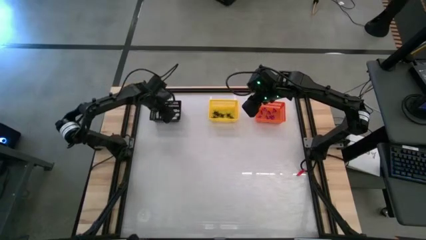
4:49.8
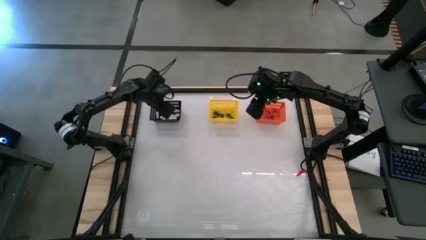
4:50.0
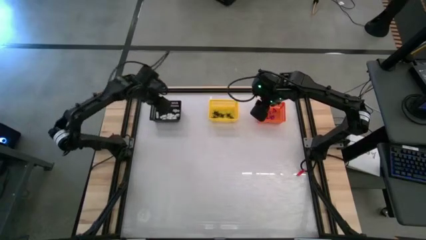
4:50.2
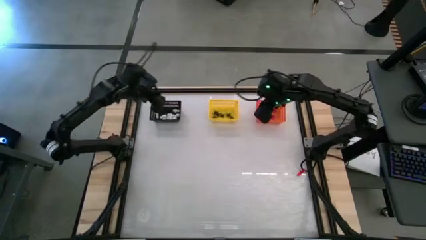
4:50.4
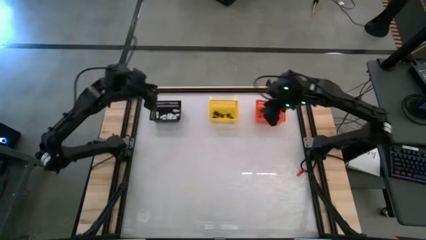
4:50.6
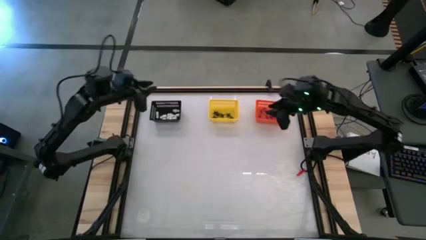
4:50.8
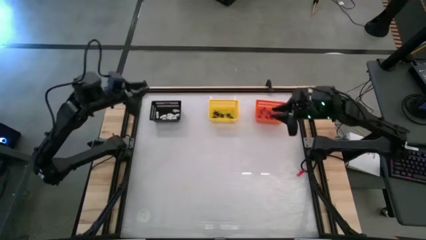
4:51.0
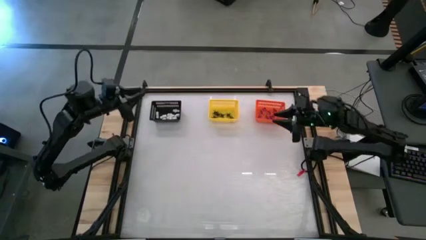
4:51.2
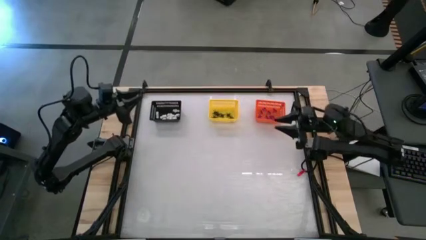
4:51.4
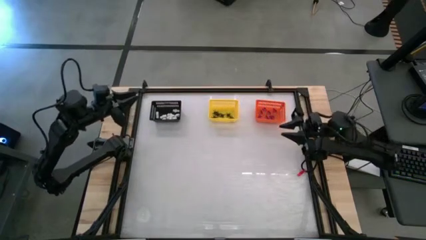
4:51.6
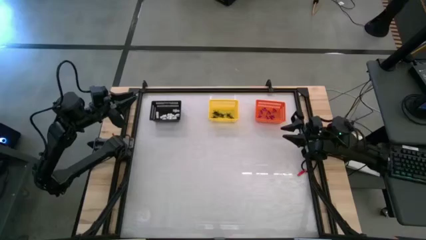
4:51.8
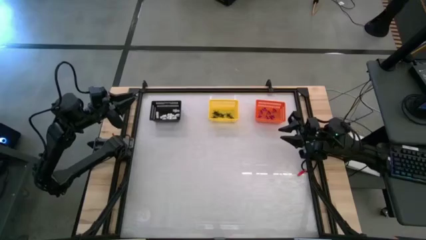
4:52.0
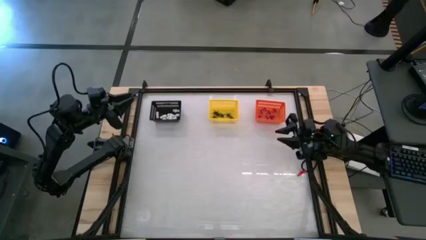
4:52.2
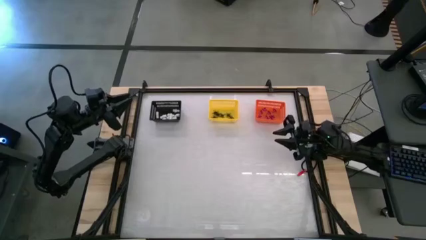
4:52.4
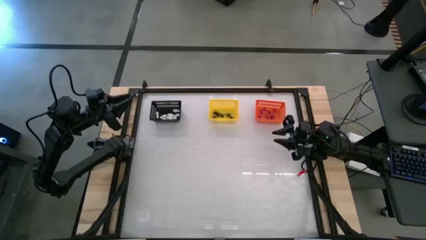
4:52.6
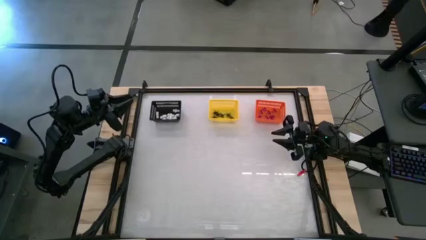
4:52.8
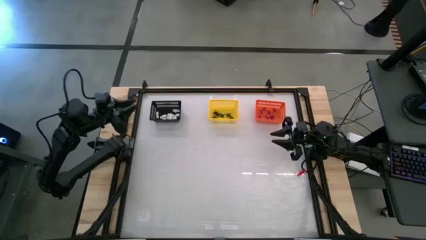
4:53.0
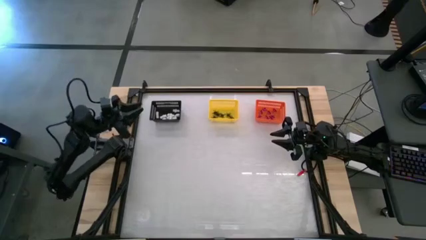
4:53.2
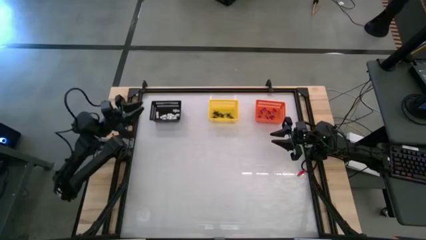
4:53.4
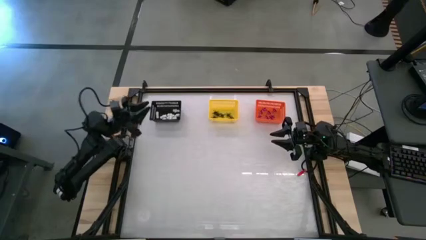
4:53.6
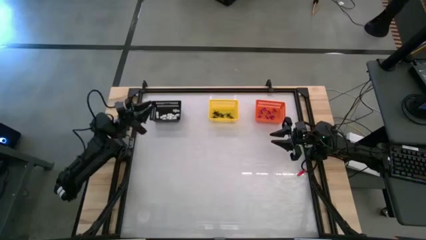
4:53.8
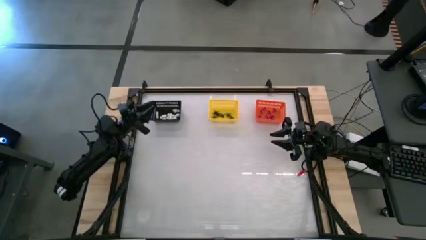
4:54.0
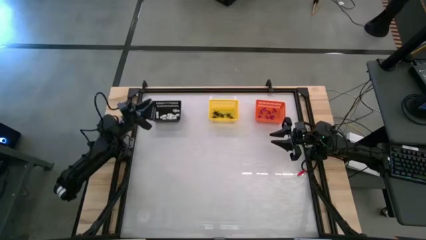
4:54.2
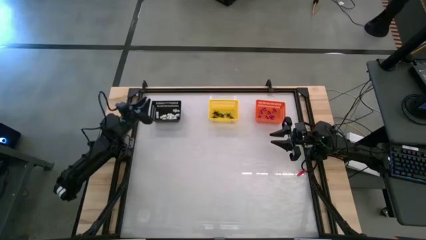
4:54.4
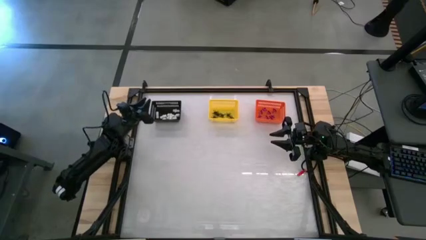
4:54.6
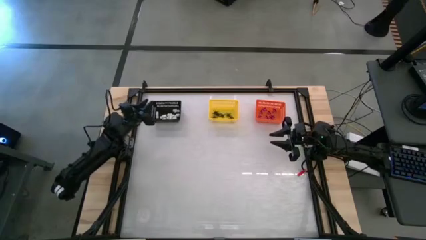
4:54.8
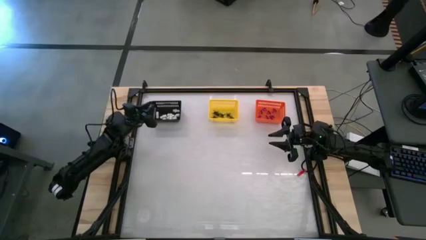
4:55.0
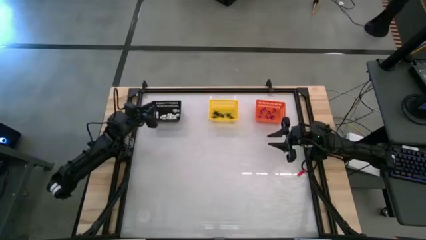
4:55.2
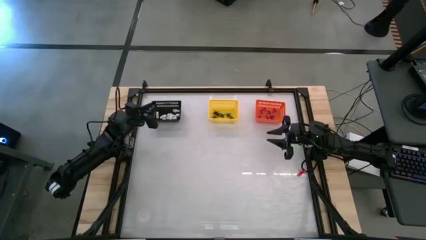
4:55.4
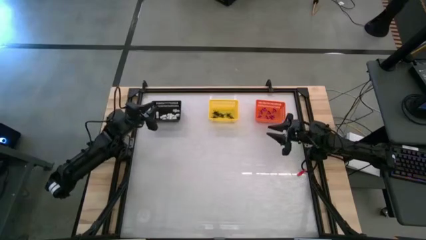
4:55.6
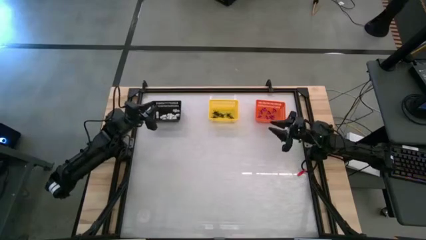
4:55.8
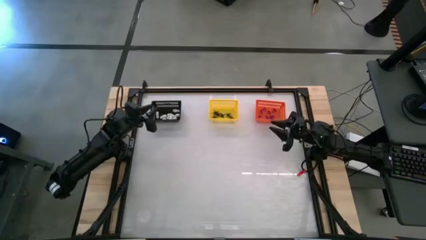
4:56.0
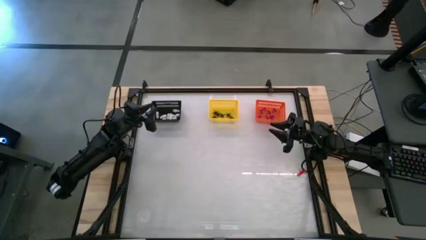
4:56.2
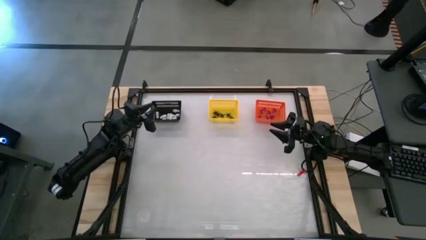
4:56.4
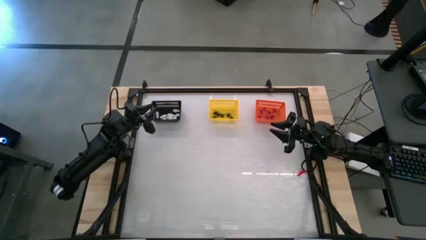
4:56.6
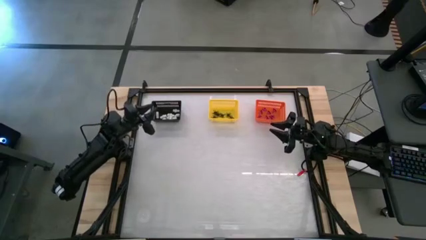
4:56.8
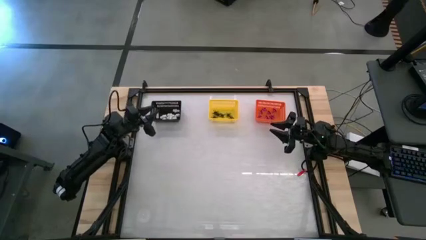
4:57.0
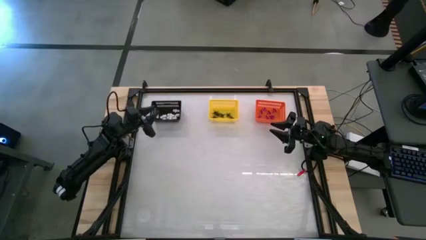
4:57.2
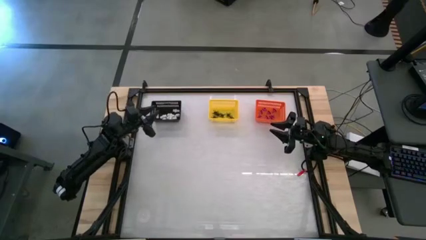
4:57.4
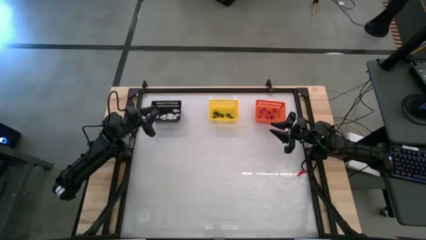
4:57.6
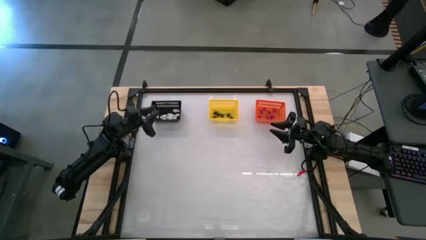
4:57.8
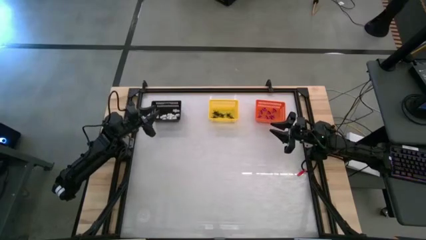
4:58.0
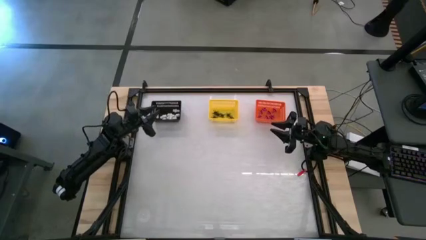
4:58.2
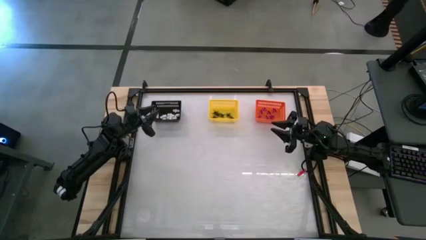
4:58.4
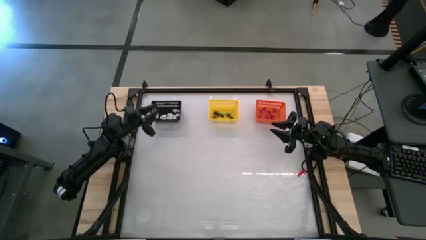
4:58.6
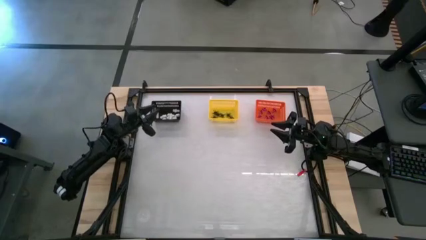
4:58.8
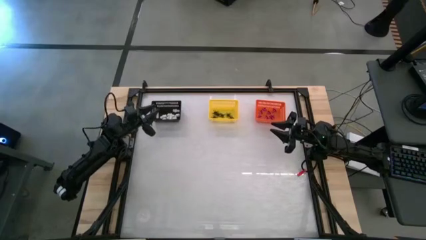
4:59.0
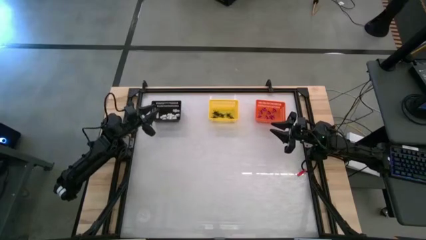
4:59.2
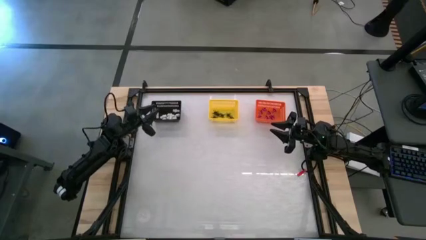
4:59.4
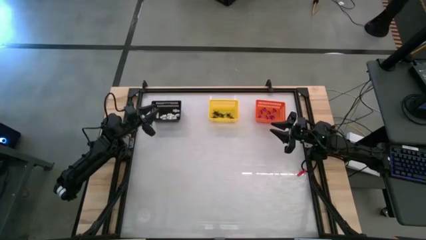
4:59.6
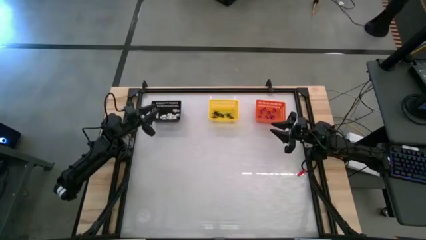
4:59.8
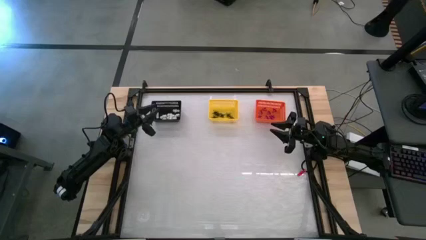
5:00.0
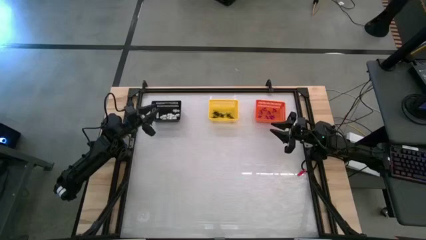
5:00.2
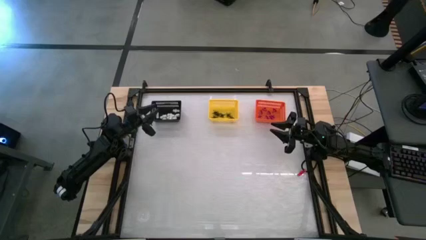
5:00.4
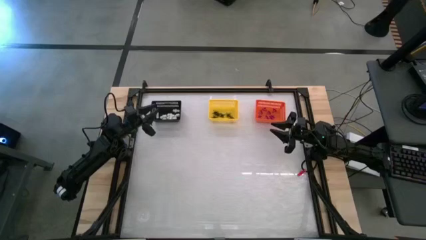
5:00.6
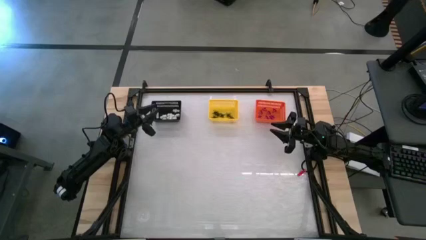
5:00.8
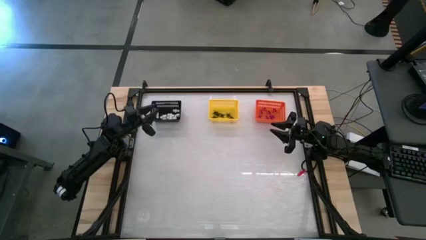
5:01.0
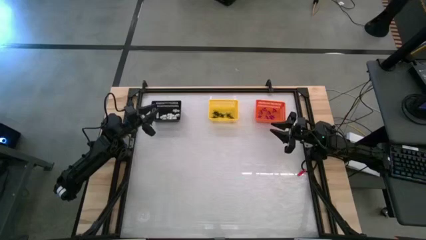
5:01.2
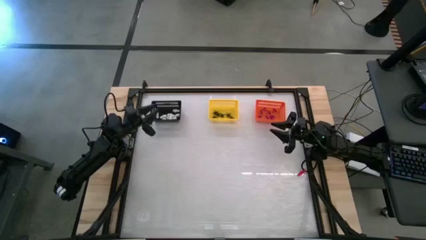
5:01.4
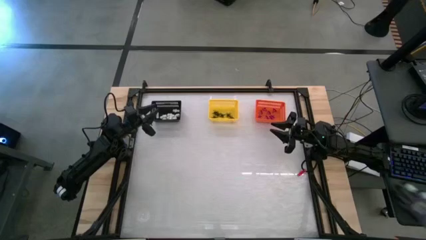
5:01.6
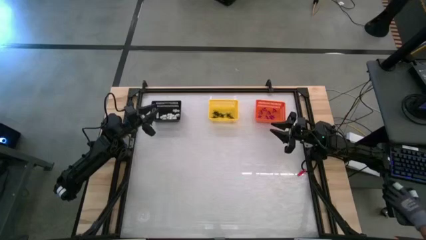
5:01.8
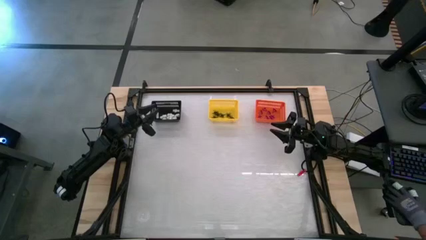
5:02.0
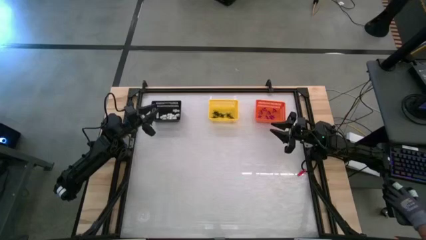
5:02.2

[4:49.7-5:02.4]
Task: Sort Halloween decoration
Return to Home Position
